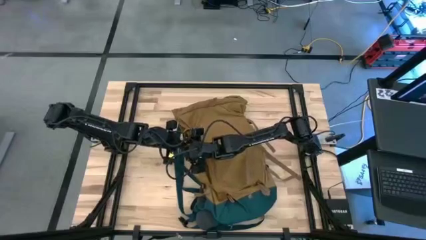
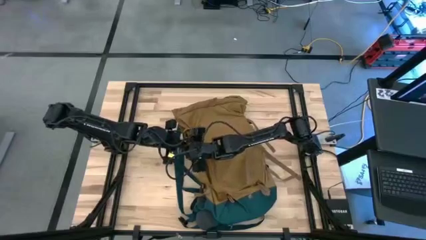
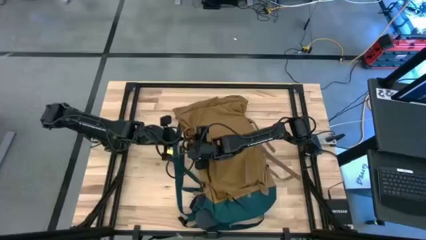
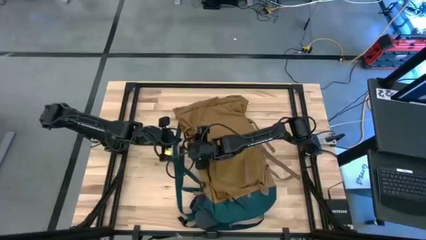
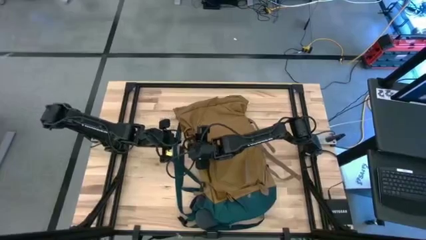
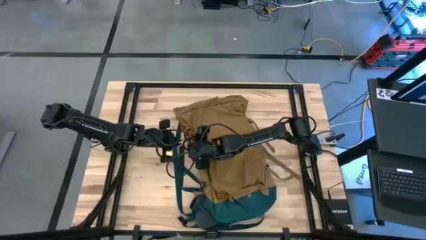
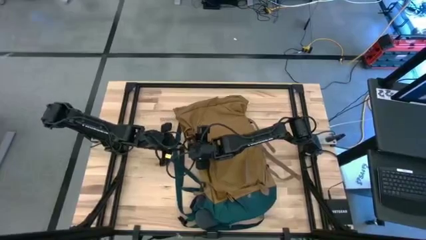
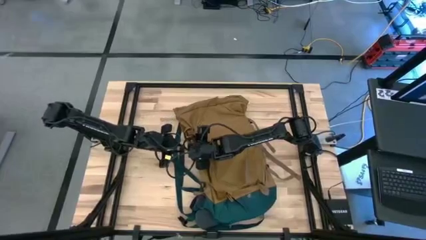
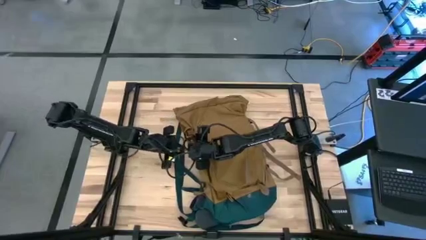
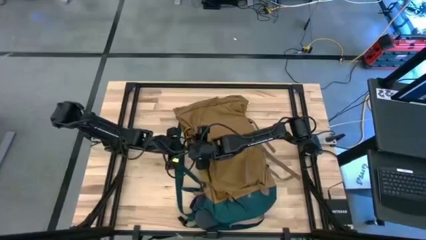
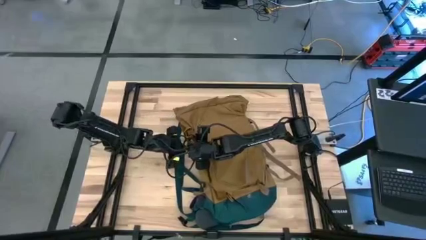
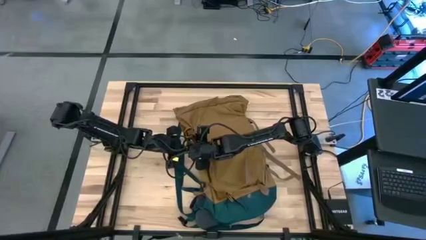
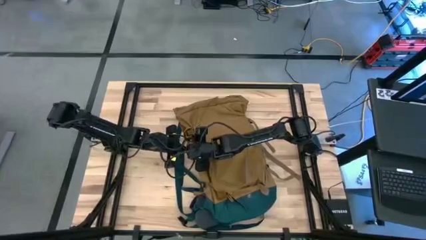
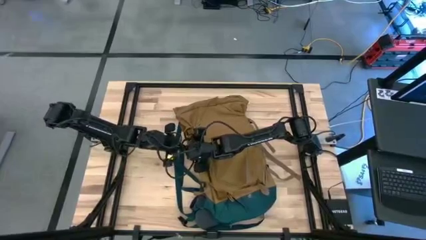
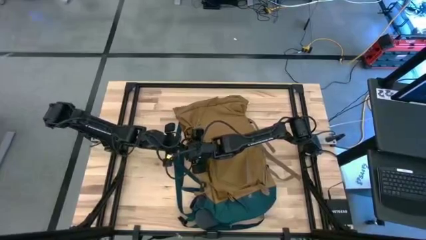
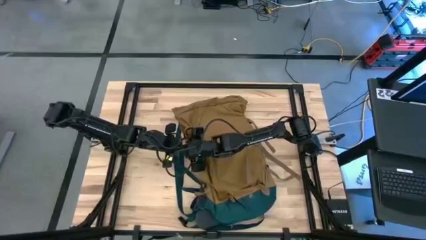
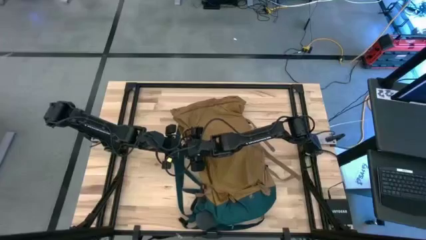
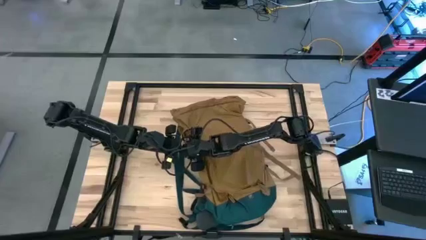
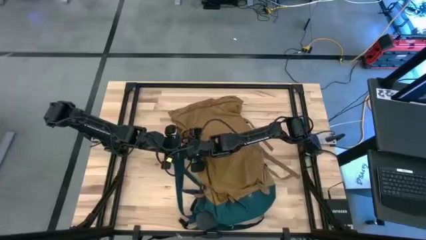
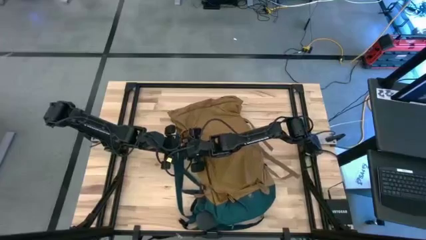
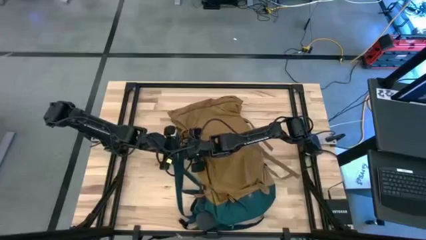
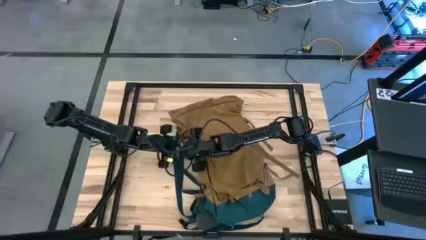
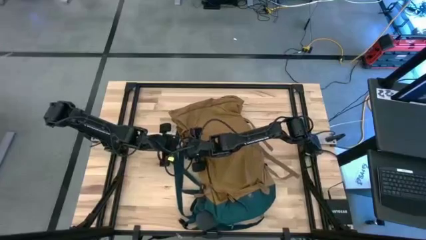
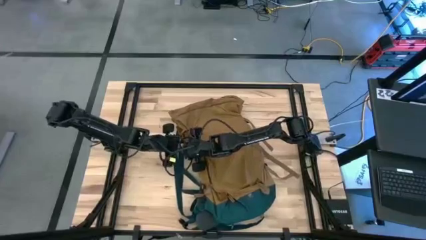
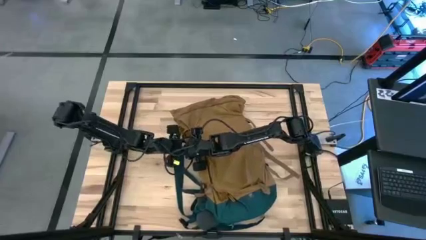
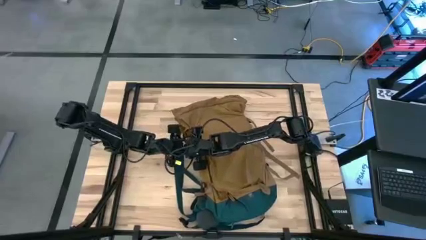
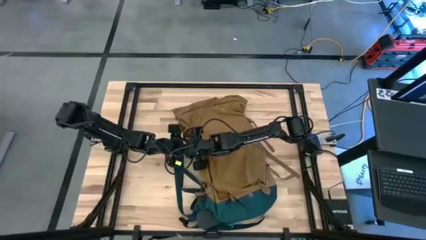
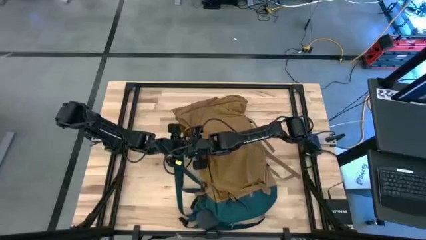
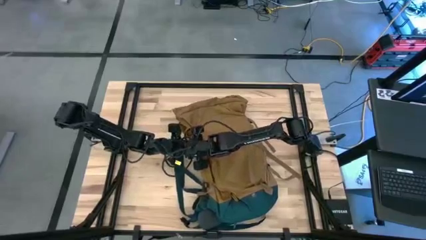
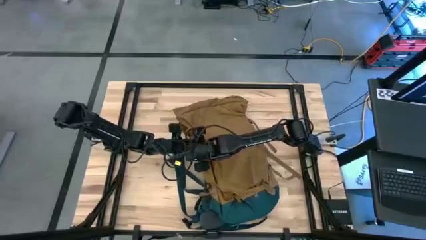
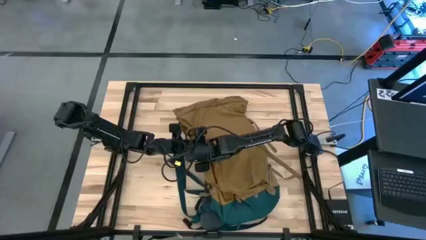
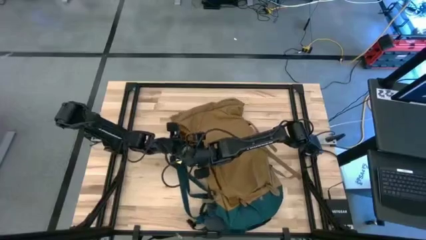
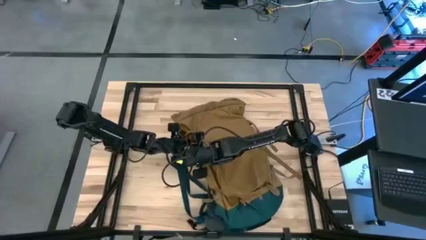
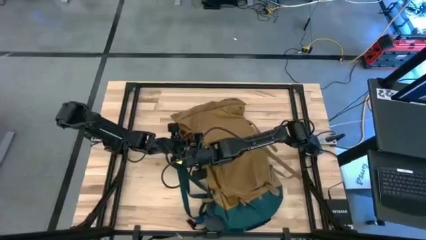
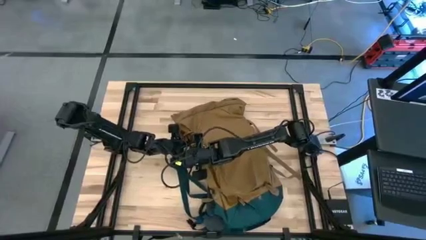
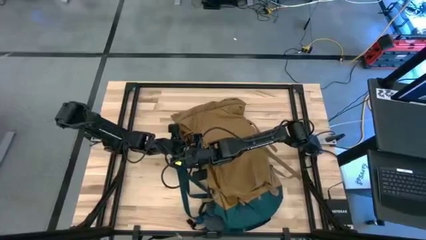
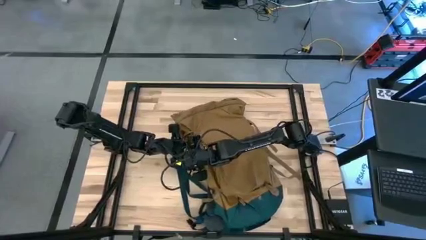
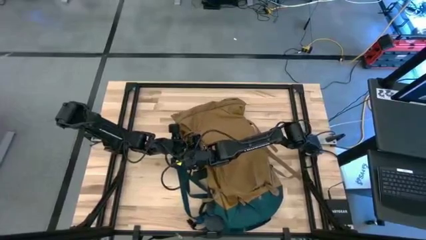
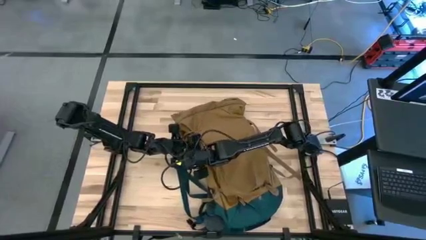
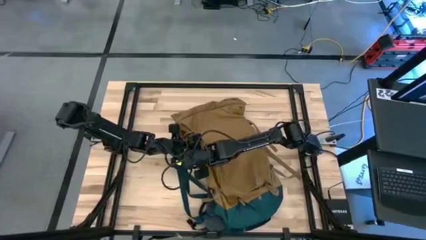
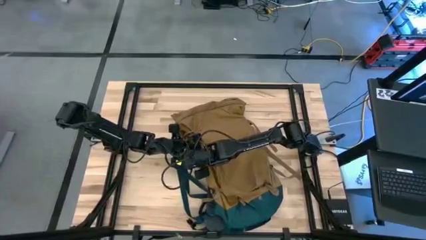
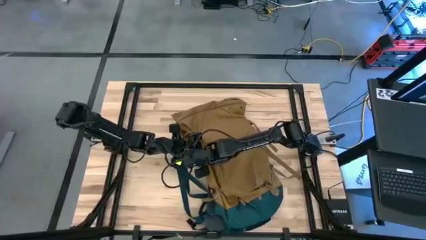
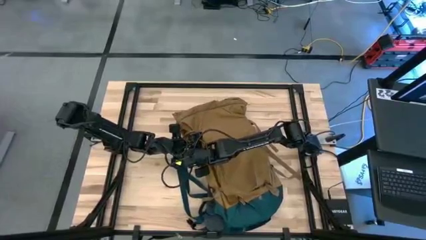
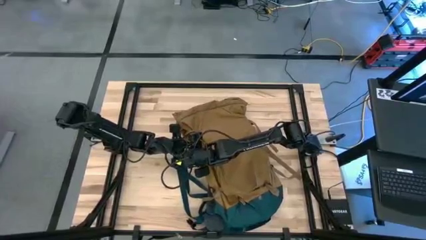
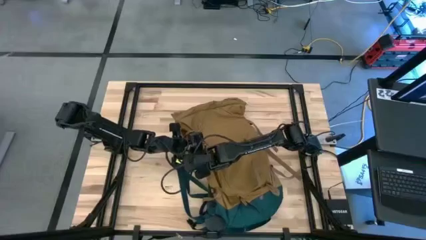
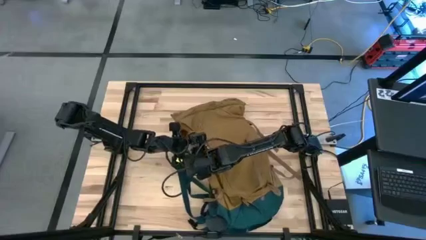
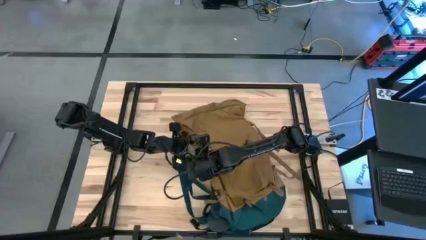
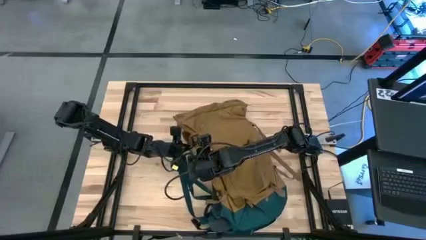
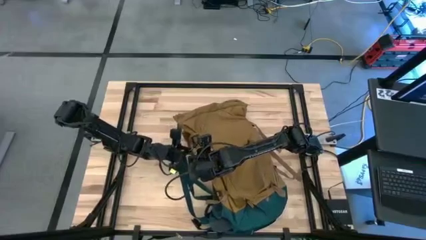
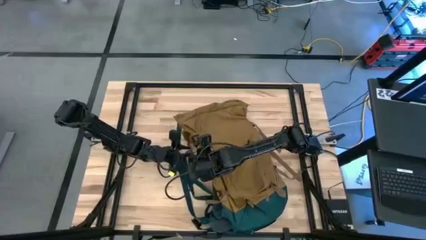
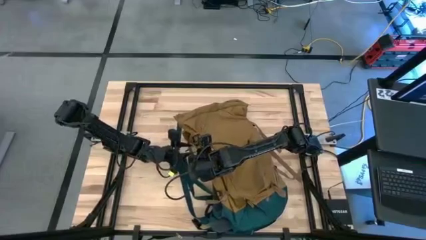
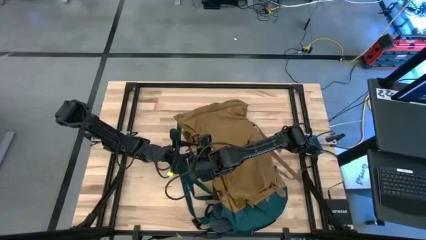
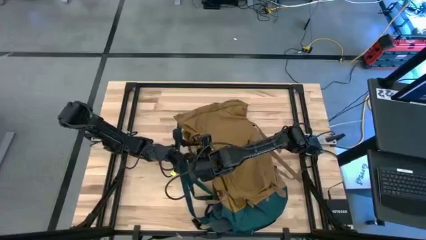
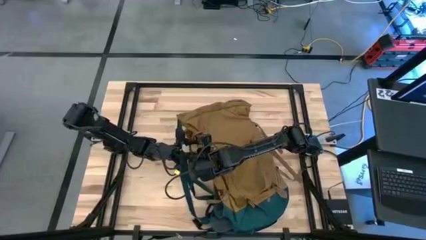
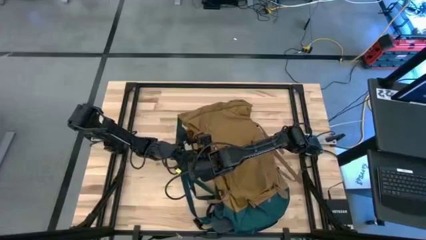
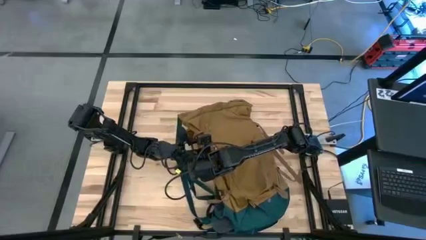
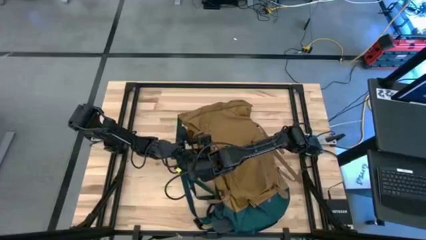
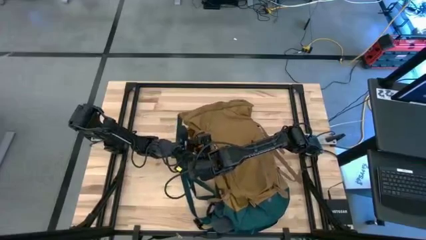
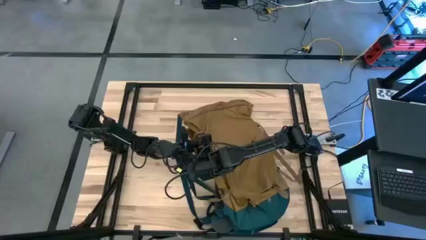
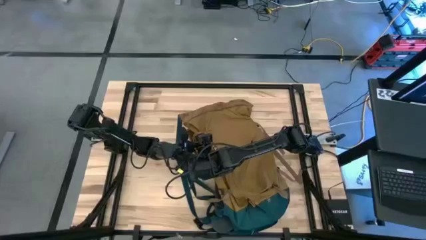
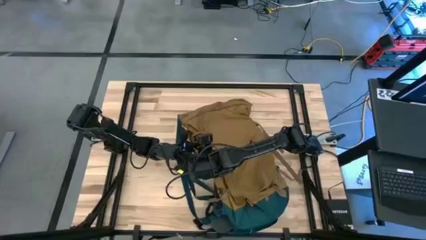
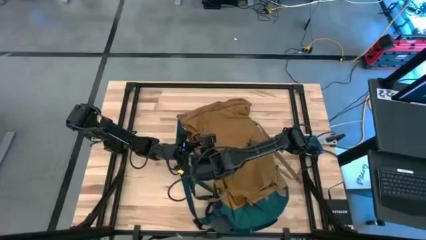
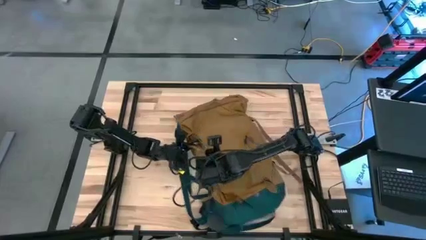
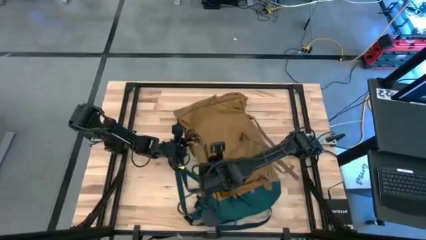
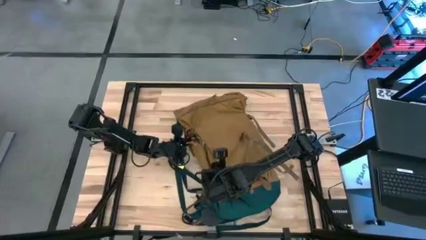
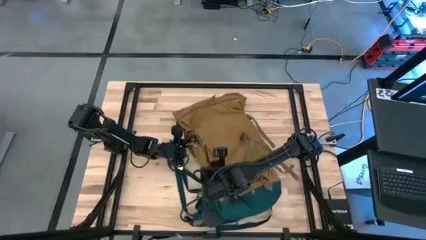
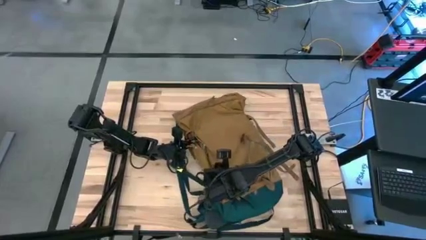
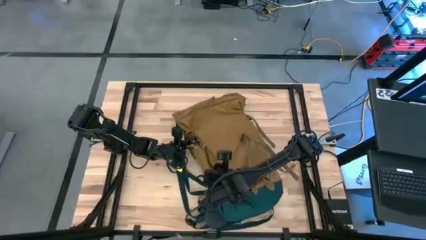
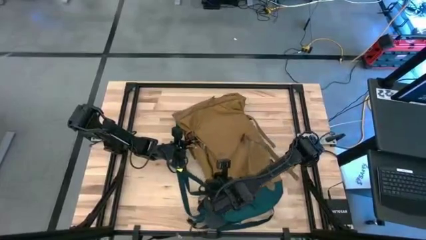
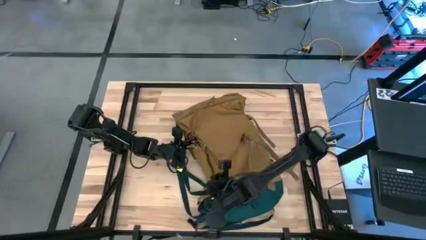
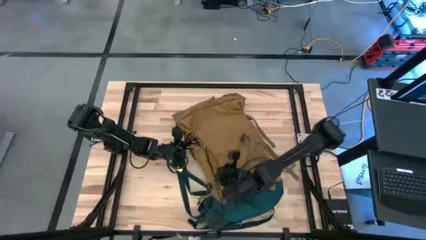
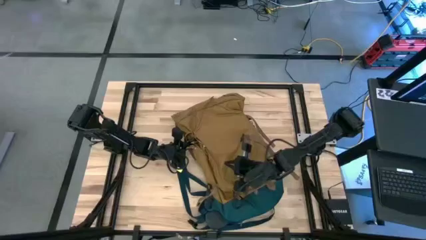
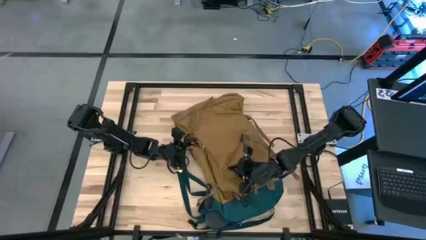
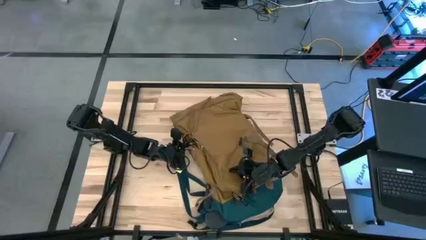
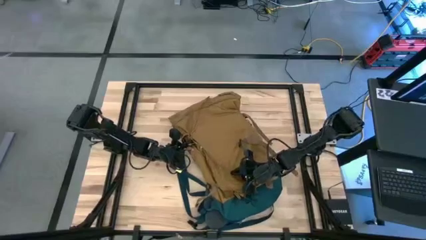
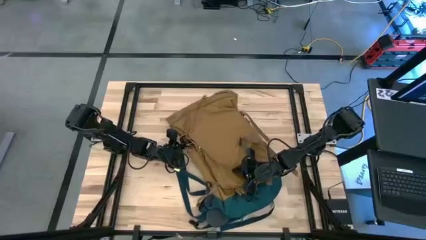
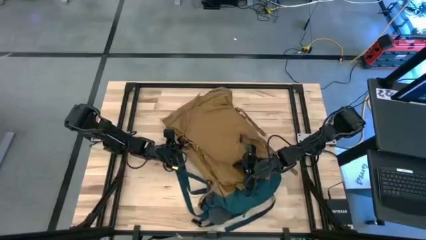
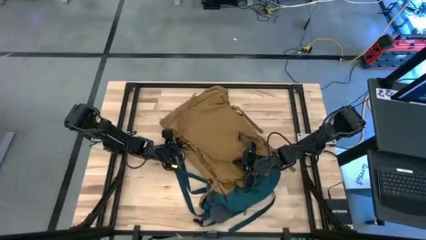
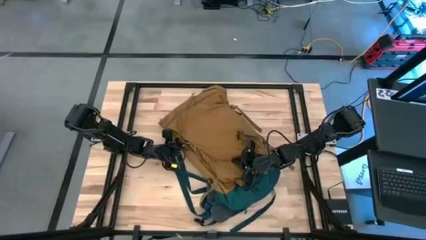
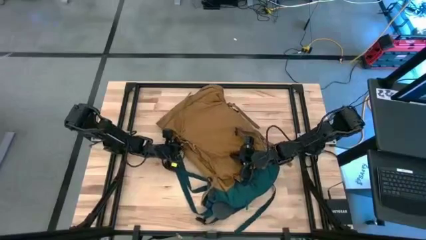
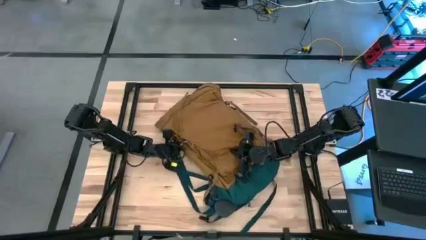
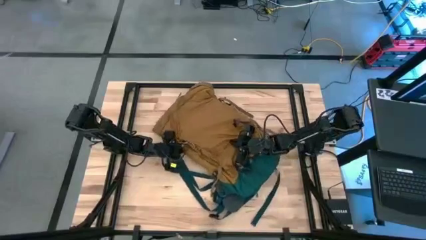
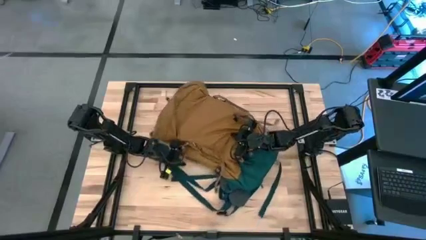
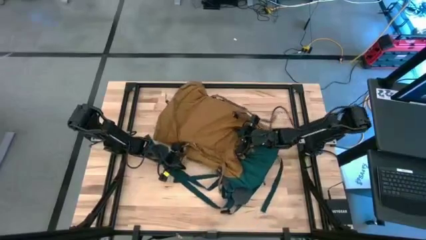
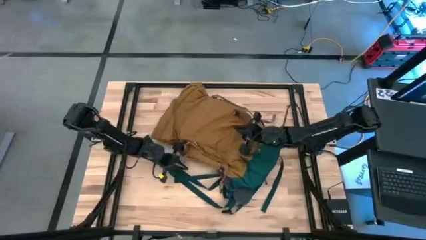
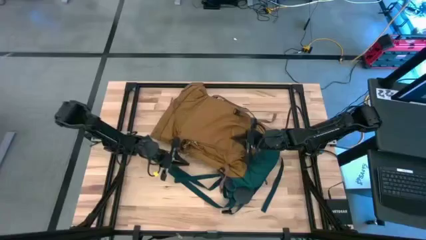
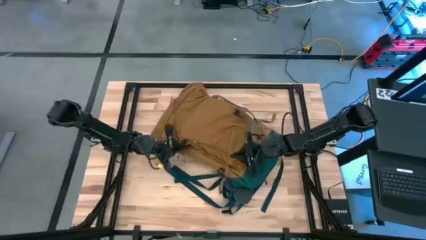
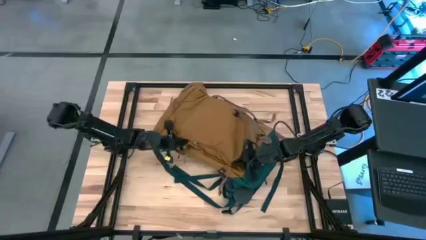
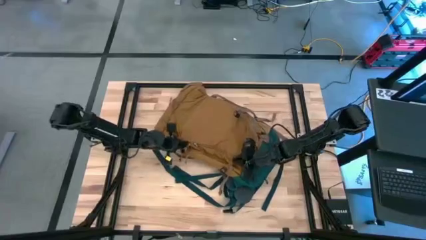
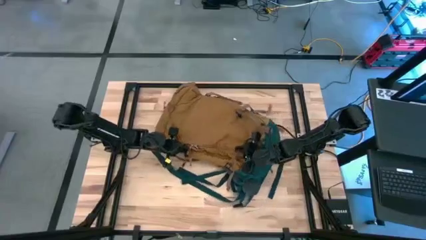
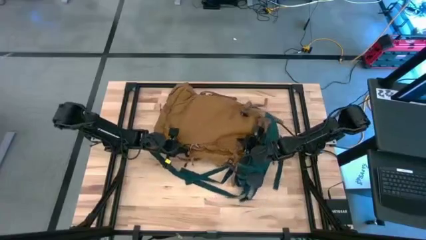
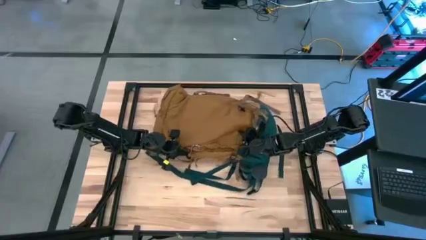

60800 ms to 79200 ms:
Task: Unpack backpack
Open the brown backpack
